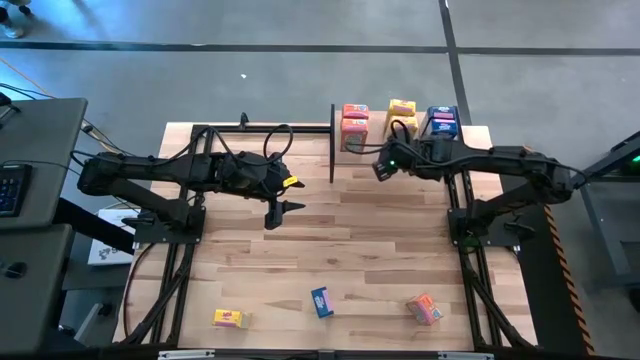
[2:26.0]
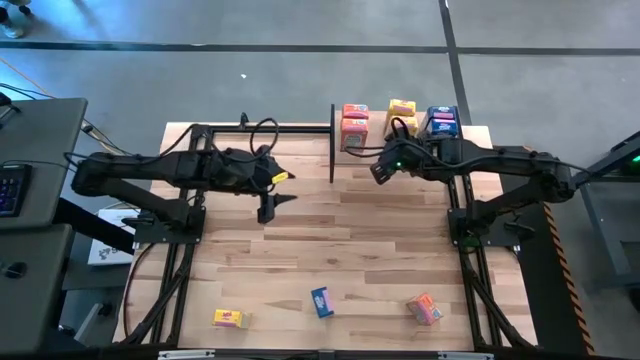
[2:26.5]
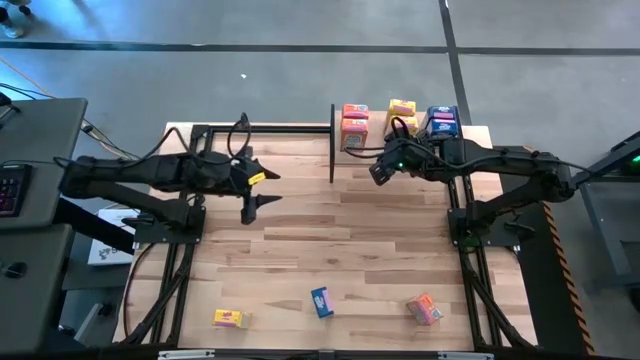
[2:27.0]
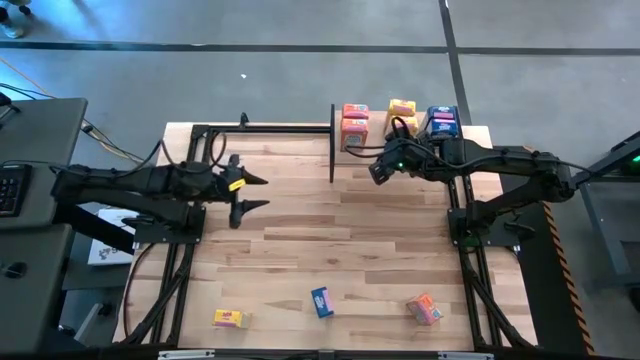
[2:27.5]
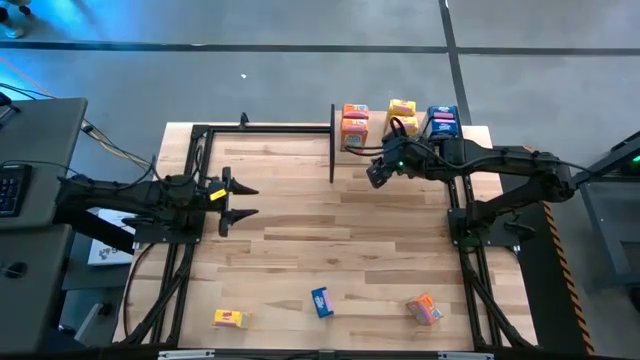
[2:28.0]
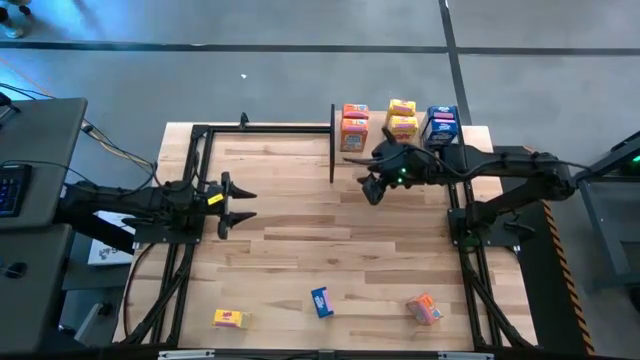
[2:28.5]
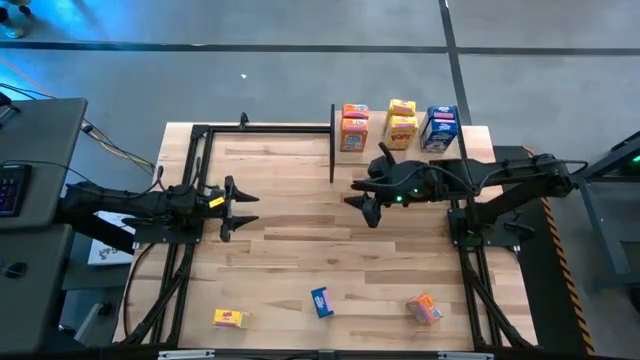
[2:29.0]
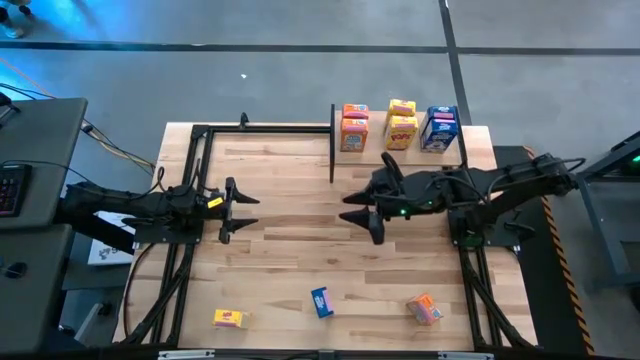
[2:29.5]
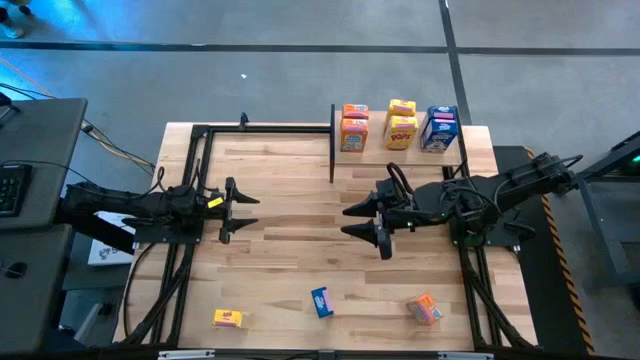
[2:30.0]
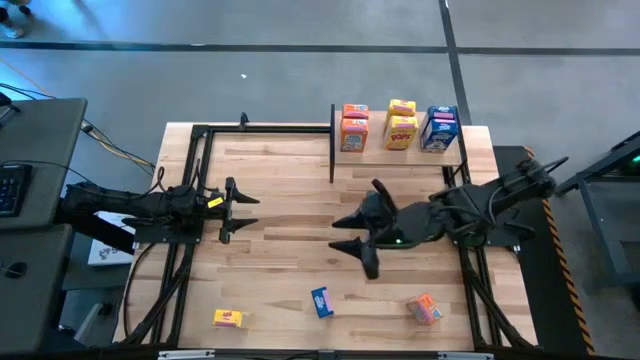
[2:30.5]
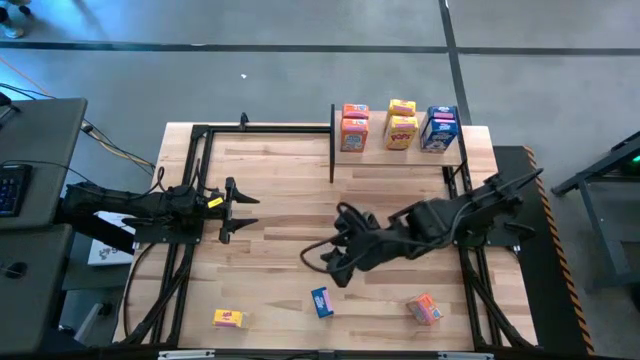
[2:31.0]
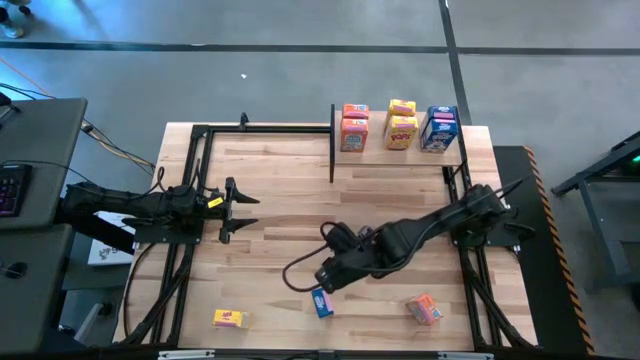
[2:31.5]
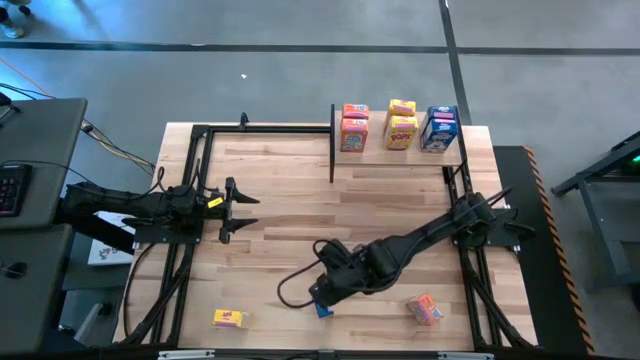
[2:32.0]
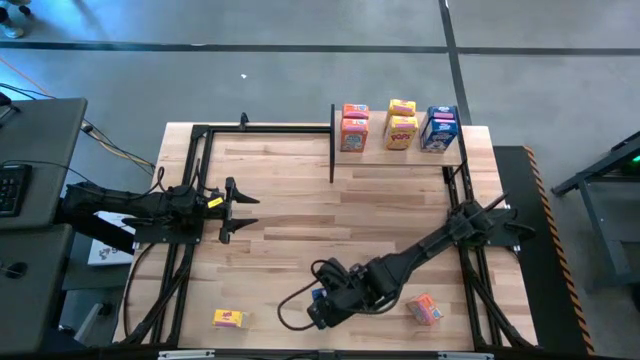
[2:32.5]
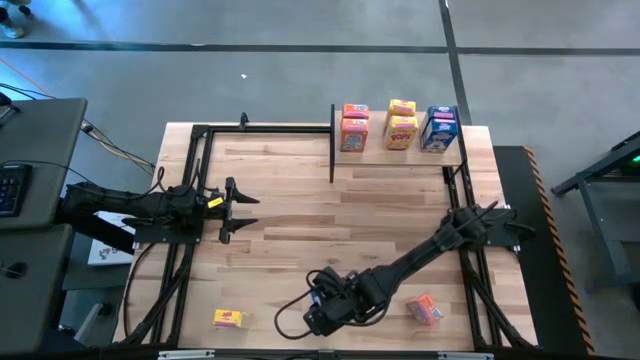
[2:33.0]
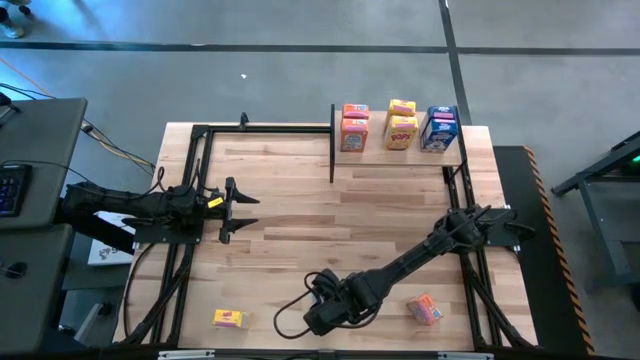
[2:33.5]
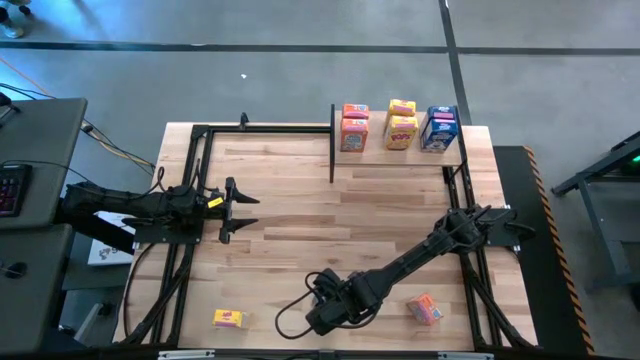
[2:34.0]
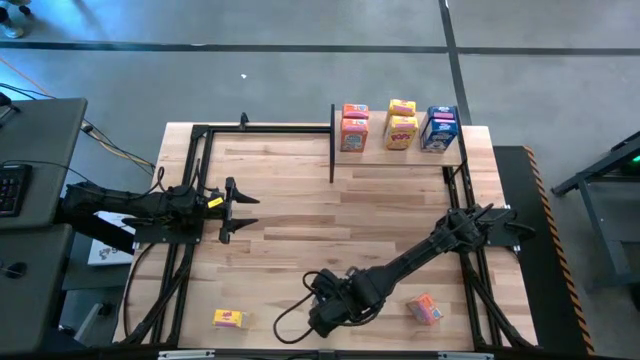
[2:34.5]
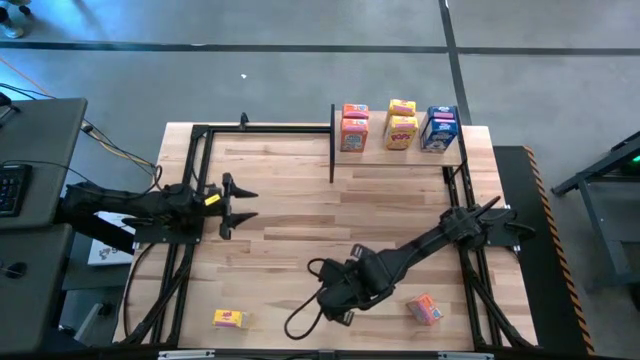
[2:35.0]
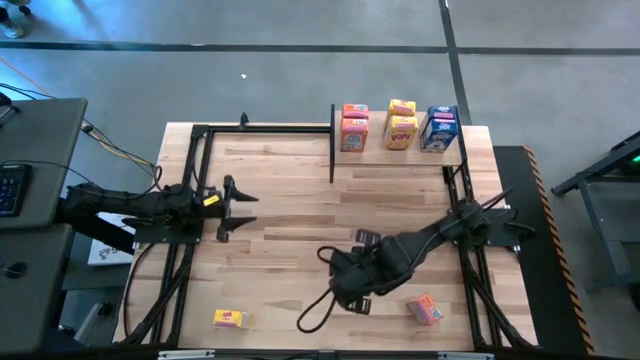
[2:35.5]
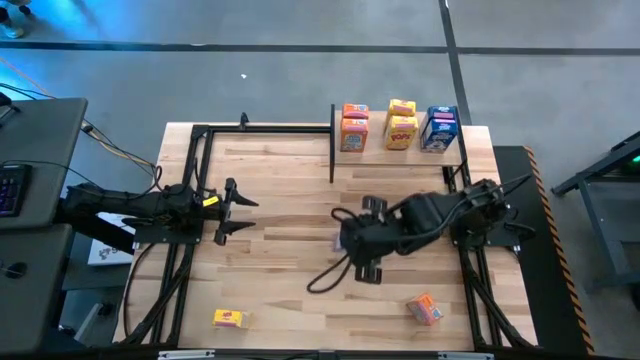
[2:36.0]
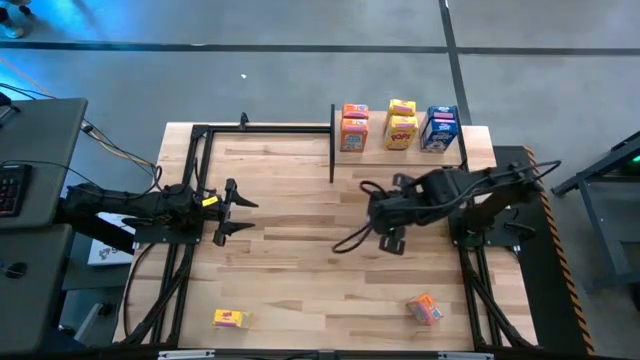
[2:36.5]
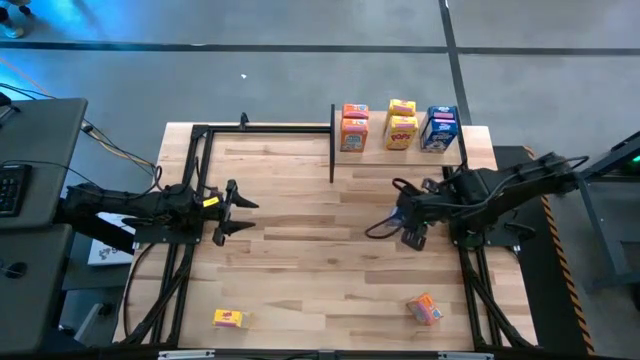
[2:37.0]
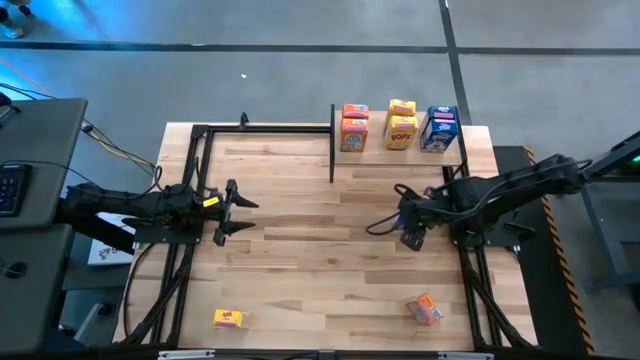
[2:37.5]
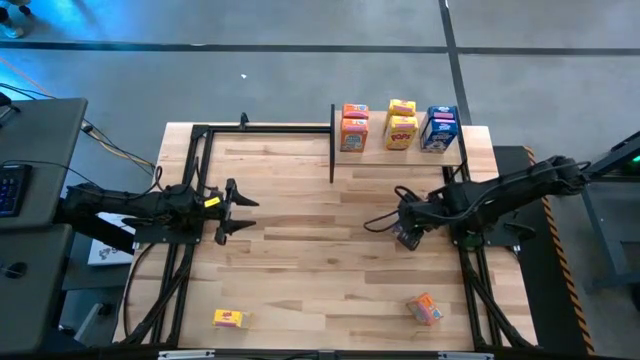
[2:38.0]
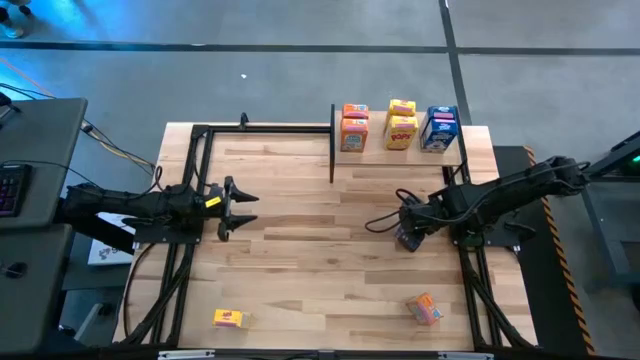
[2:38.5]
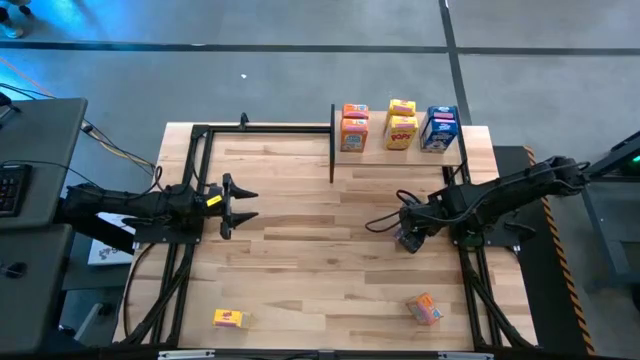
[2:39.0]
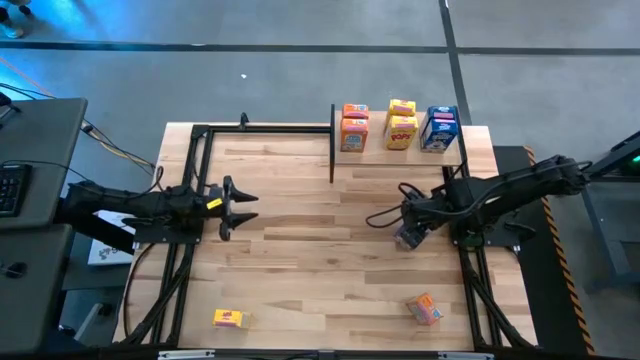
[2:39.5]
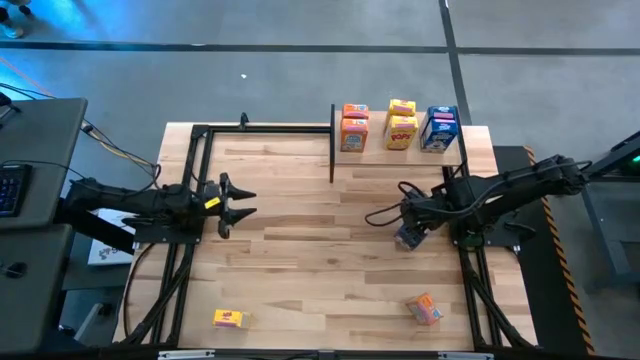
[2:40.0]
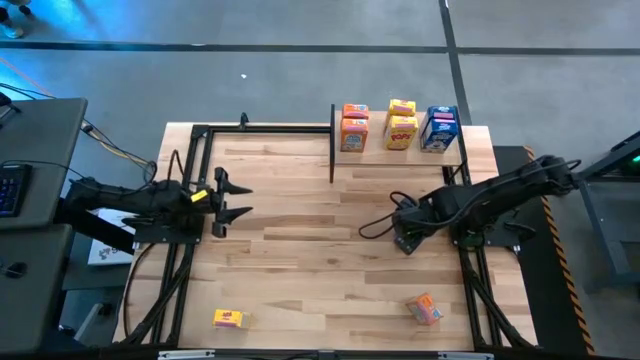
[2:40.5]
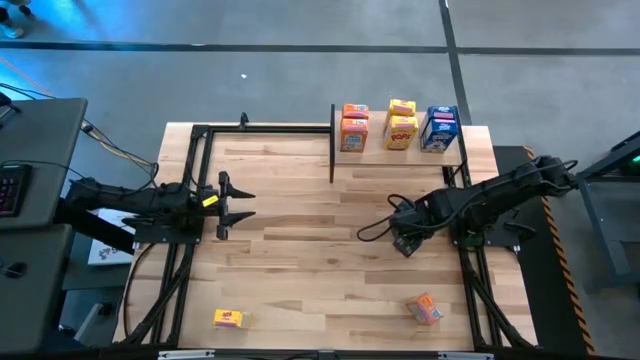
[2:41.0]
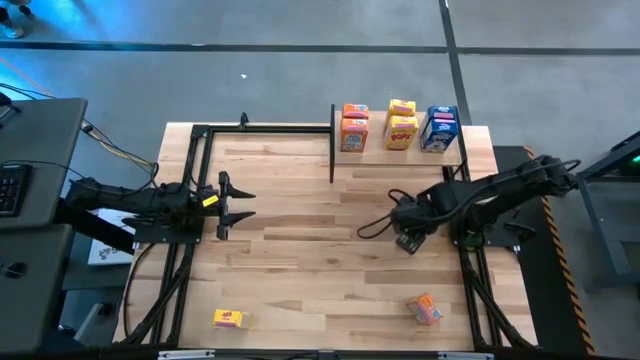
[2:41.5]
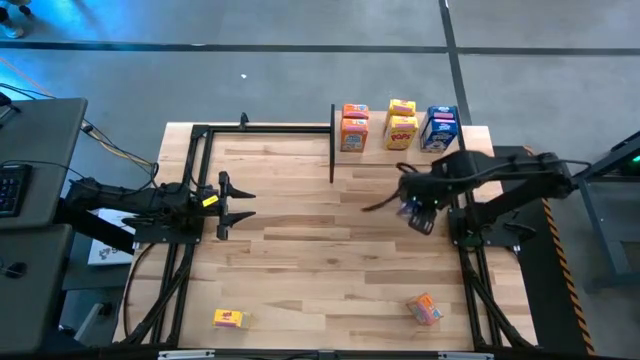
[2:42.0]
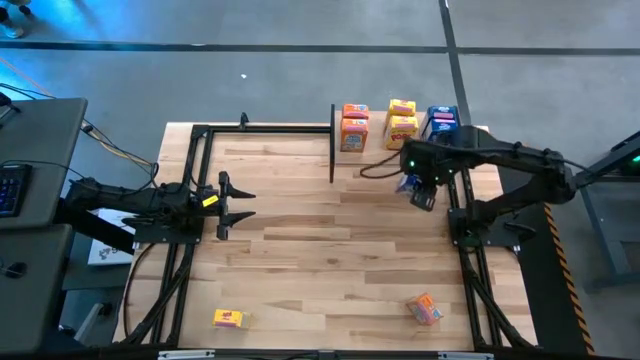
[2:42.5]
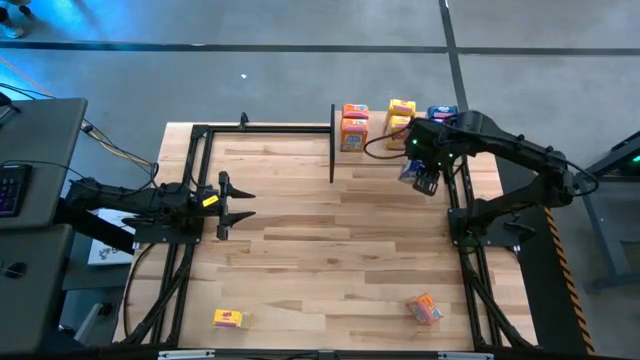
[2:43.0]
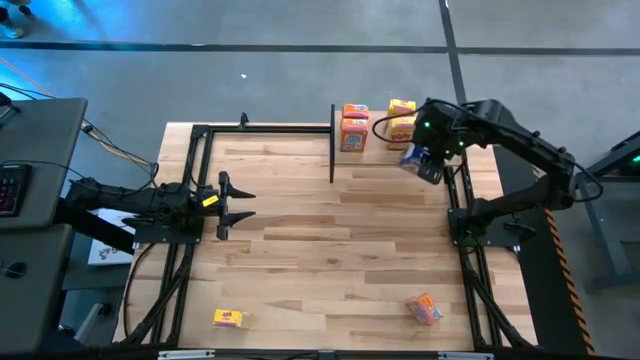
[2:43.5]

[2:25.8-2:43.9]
Task: Stack cereal on shelf
Put the blue cereal box on the shelf aligned with the other blue cereal boxes

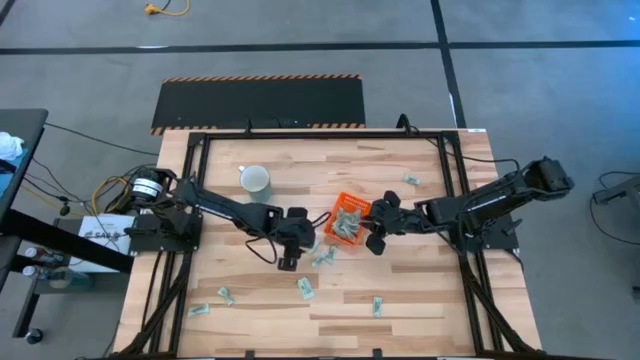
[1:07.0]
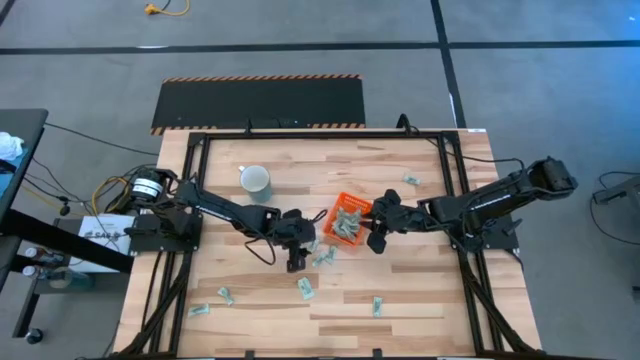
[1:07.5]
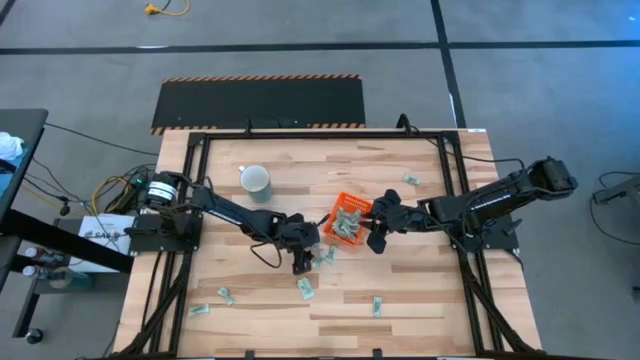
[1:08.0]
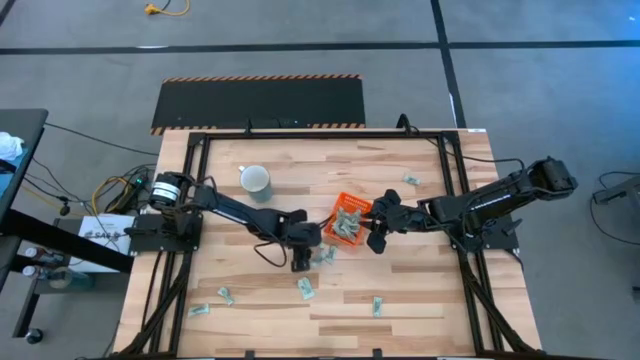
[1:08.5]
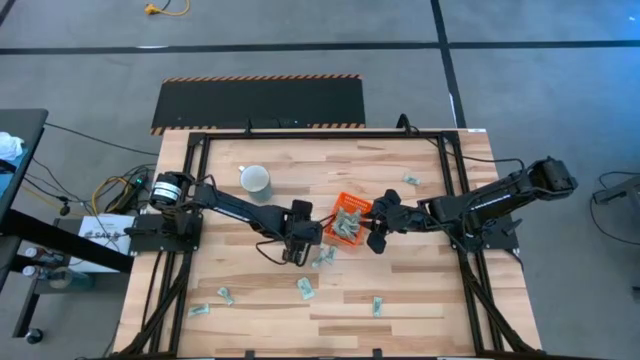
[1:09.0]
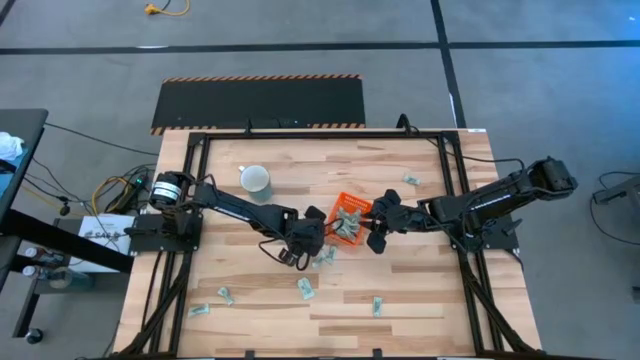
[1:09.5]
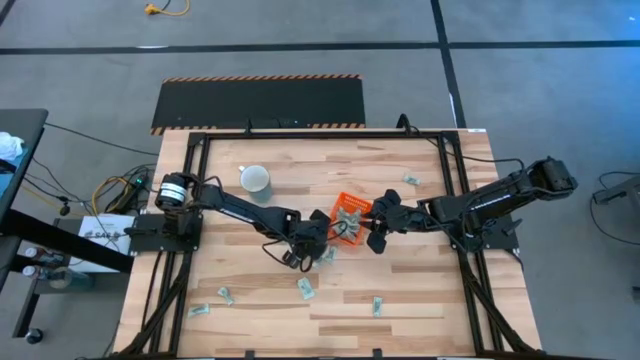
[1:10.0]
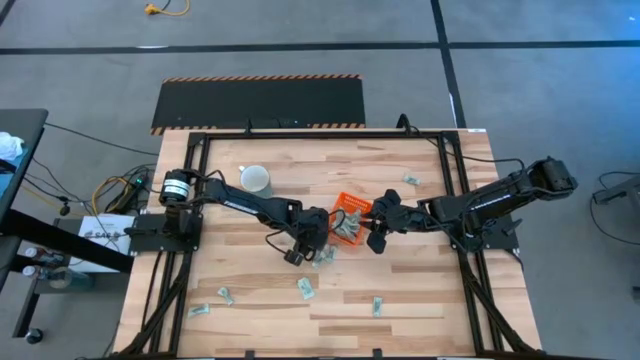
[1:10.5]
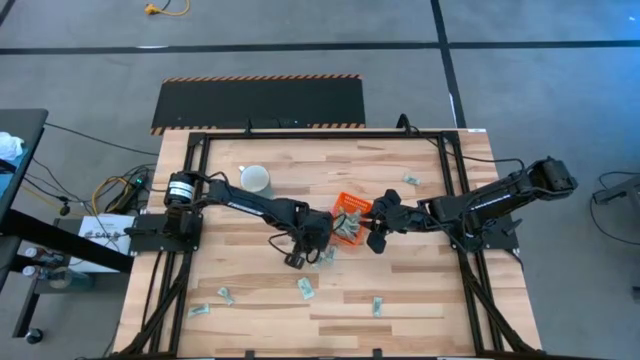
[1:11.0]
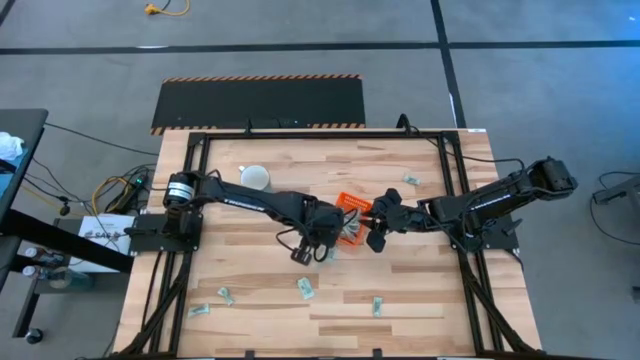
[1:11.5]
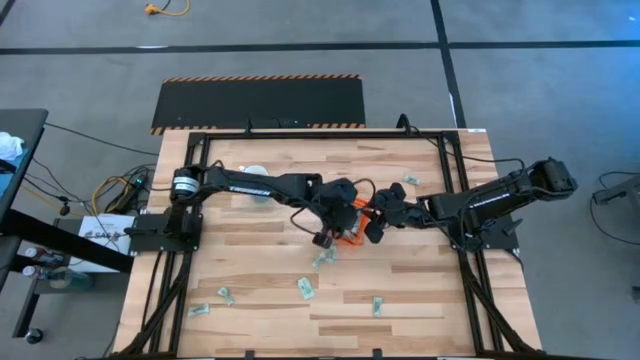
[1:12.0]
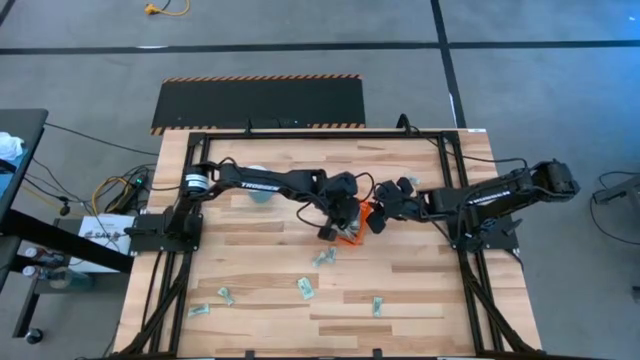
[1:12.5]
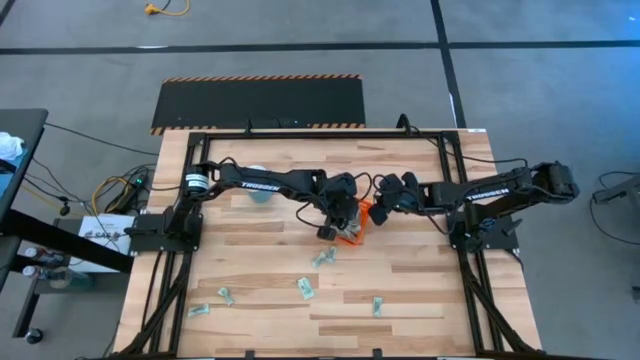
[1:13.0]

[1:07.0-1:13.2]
Task: Pick and place Stevia / Truvia into bins
Put the stevia packet into the basket
